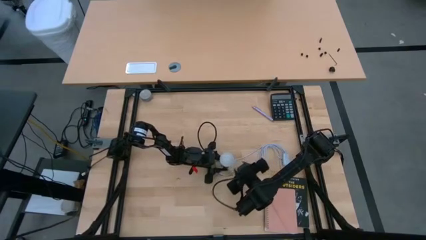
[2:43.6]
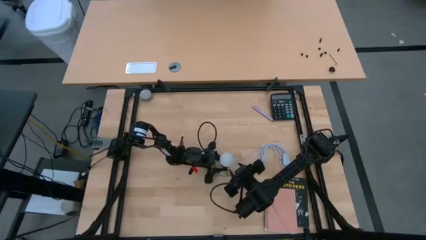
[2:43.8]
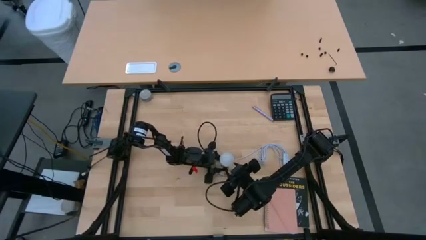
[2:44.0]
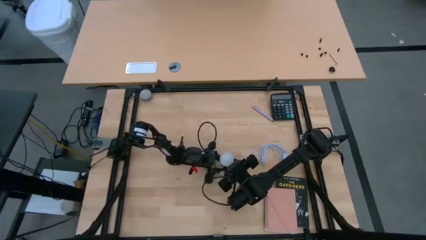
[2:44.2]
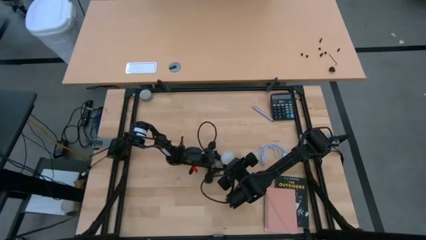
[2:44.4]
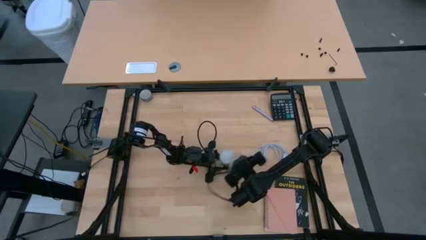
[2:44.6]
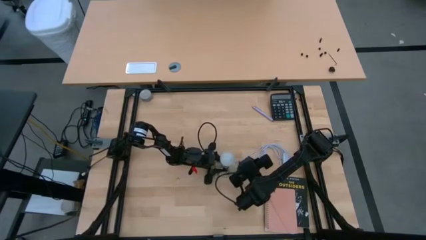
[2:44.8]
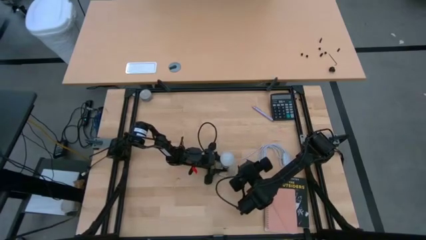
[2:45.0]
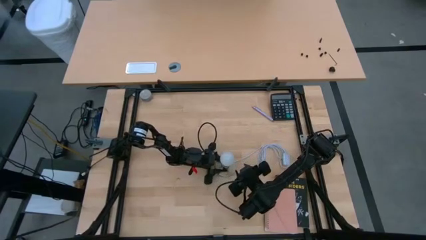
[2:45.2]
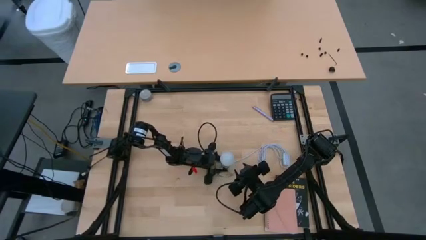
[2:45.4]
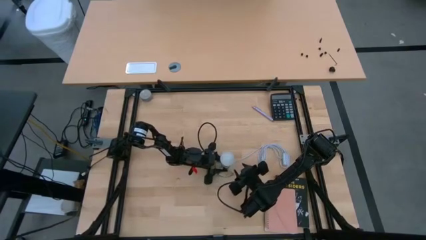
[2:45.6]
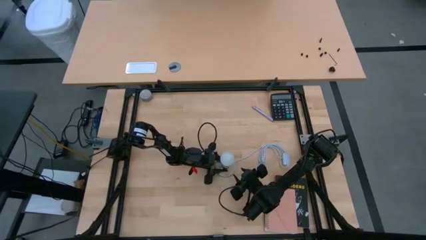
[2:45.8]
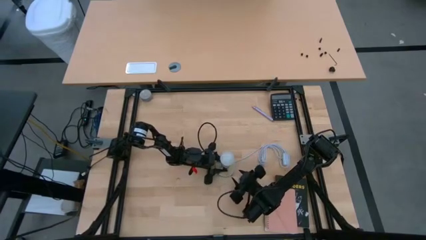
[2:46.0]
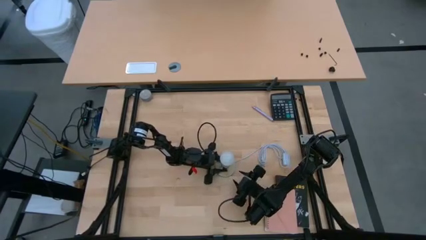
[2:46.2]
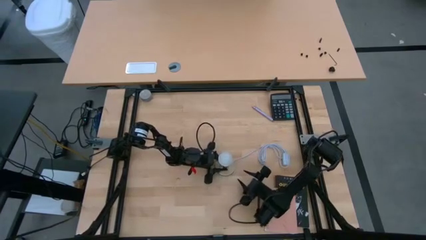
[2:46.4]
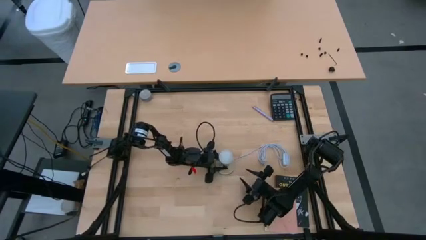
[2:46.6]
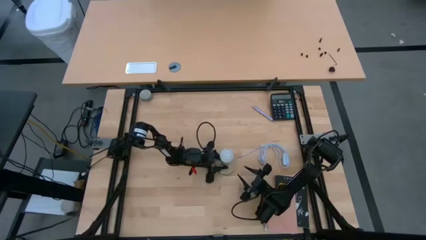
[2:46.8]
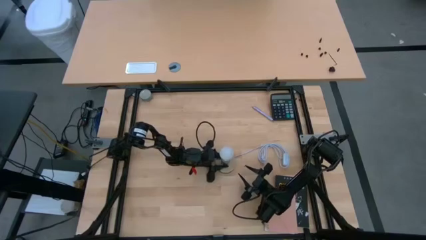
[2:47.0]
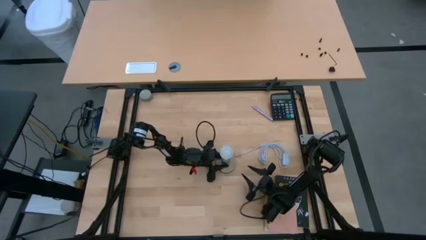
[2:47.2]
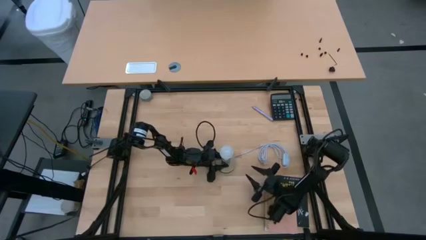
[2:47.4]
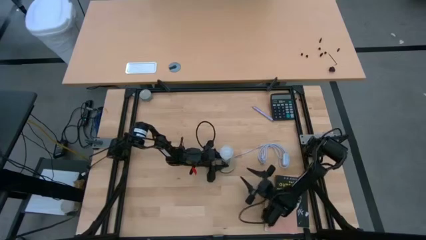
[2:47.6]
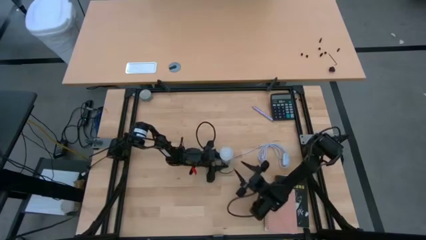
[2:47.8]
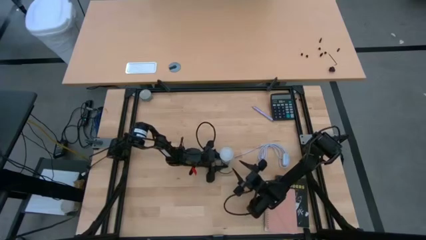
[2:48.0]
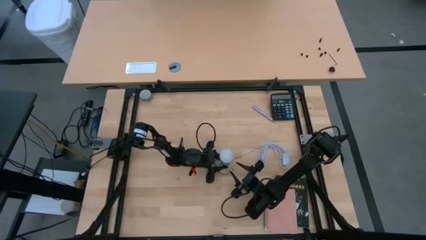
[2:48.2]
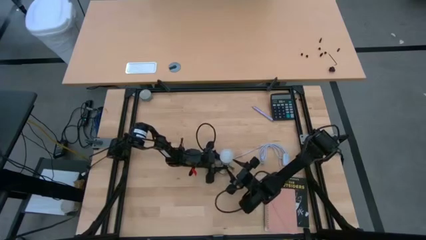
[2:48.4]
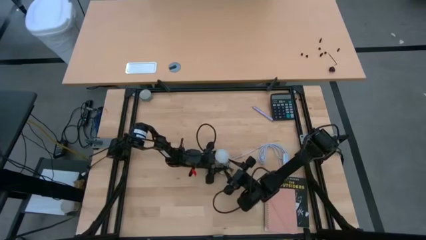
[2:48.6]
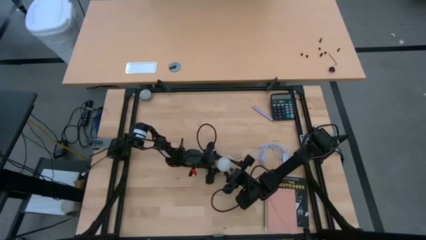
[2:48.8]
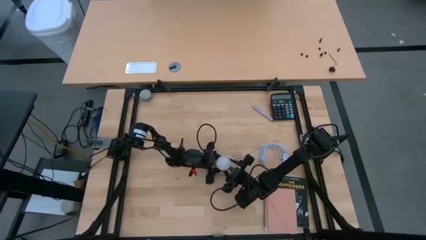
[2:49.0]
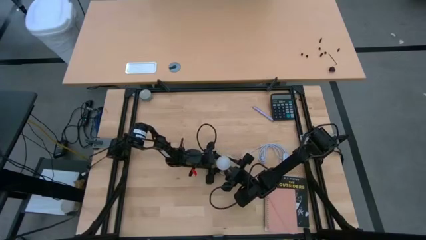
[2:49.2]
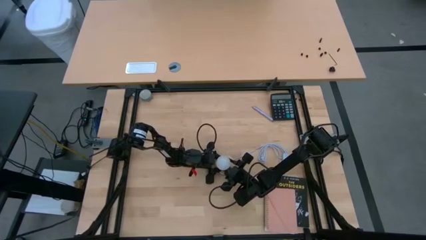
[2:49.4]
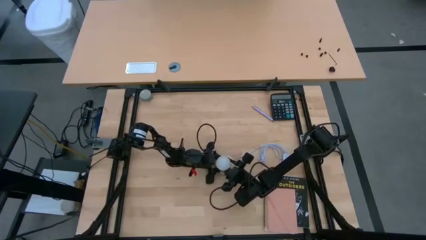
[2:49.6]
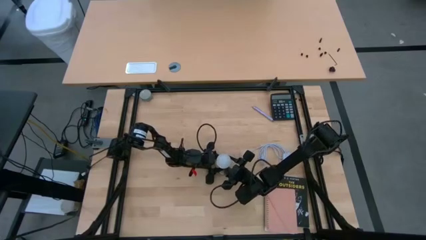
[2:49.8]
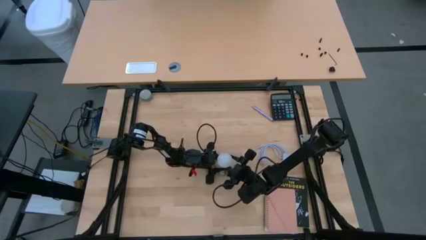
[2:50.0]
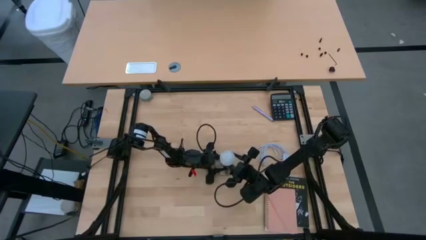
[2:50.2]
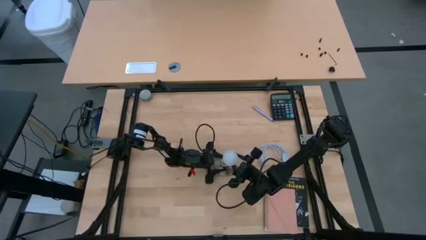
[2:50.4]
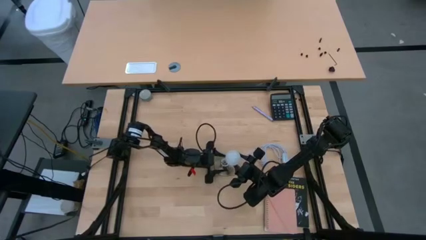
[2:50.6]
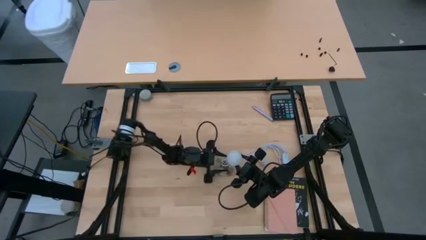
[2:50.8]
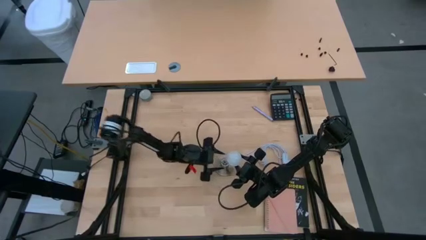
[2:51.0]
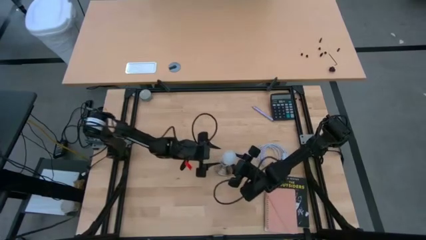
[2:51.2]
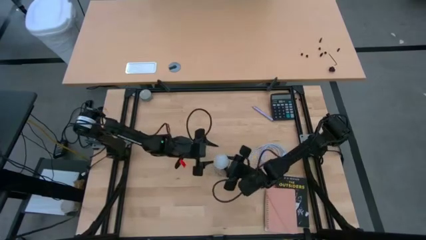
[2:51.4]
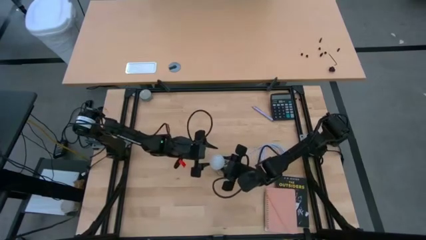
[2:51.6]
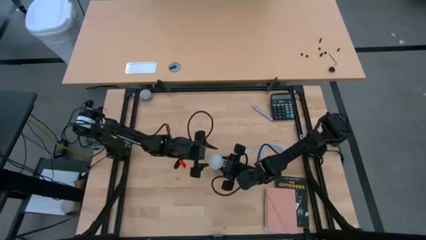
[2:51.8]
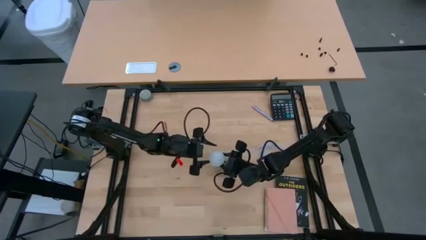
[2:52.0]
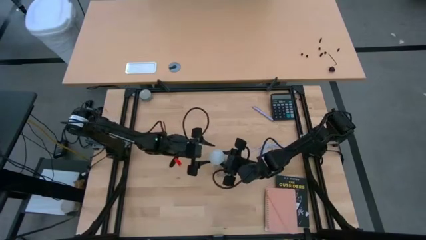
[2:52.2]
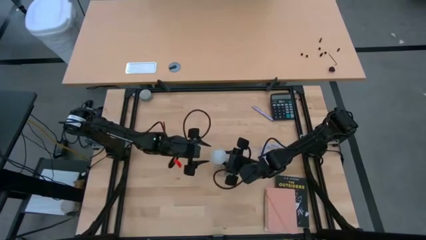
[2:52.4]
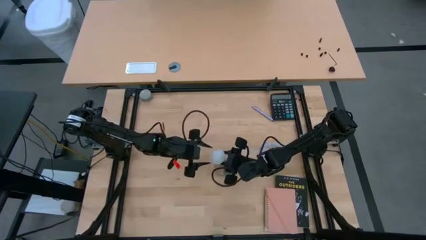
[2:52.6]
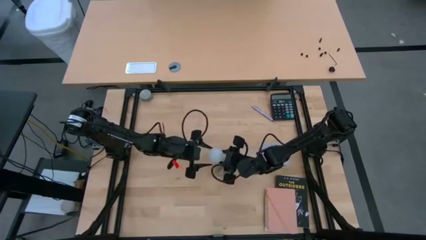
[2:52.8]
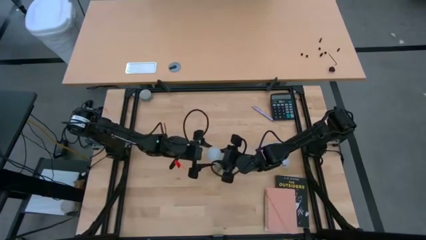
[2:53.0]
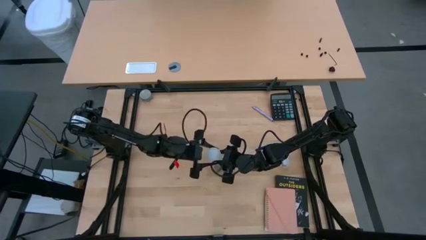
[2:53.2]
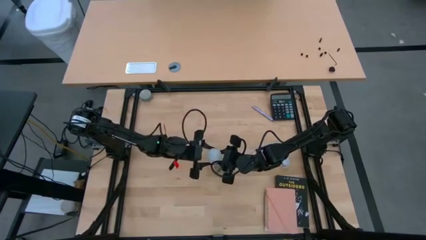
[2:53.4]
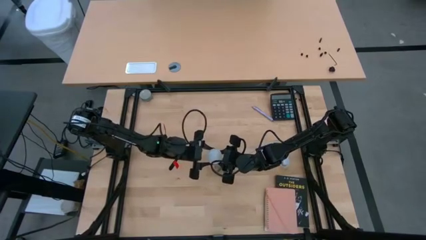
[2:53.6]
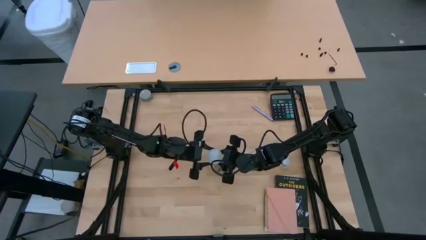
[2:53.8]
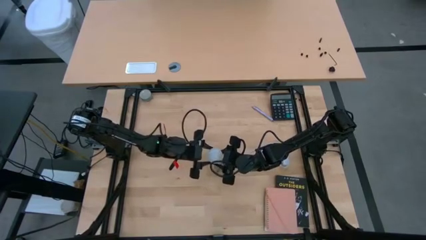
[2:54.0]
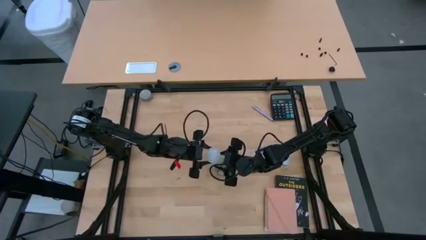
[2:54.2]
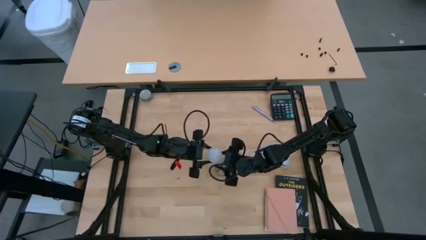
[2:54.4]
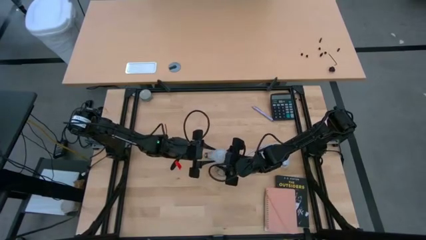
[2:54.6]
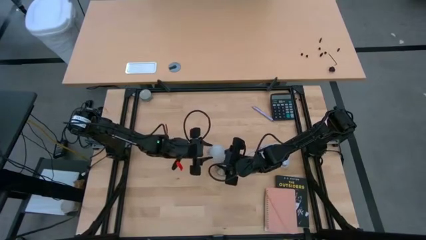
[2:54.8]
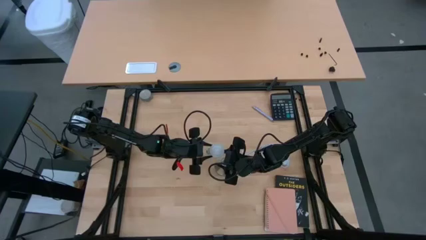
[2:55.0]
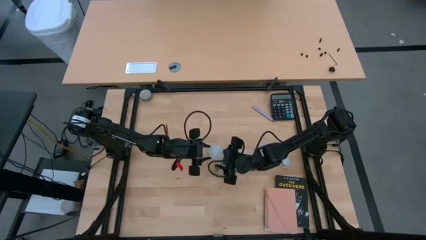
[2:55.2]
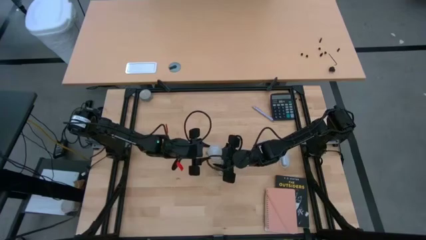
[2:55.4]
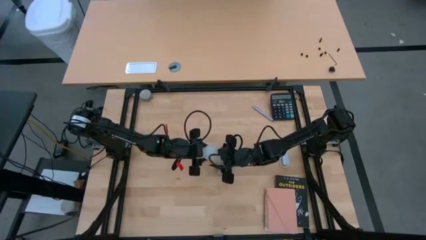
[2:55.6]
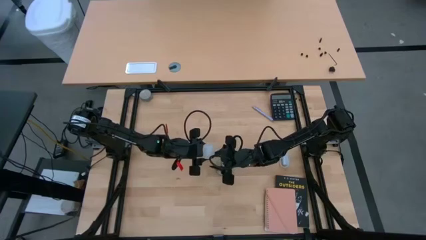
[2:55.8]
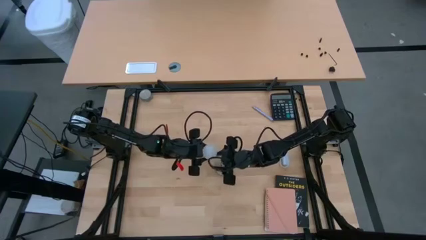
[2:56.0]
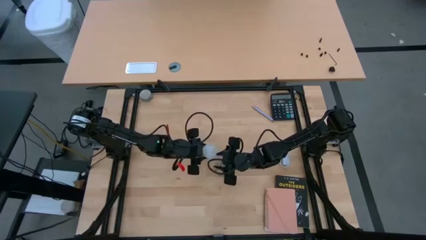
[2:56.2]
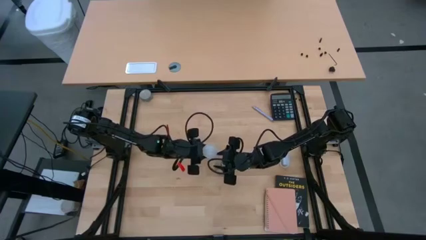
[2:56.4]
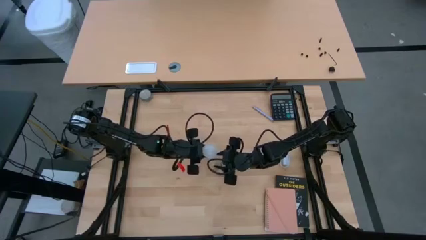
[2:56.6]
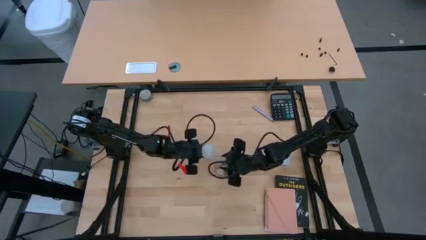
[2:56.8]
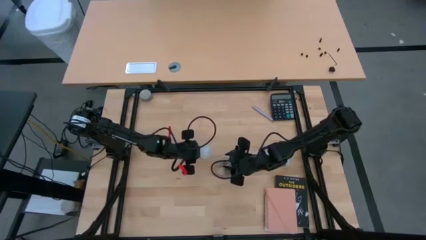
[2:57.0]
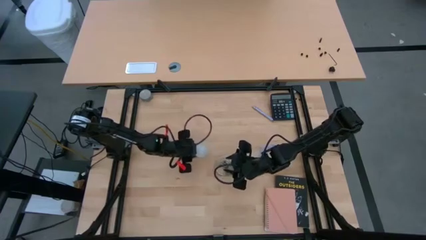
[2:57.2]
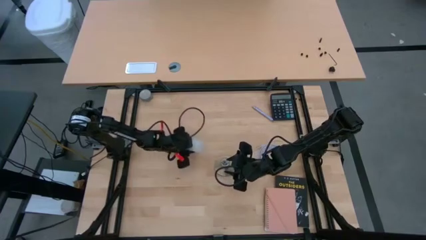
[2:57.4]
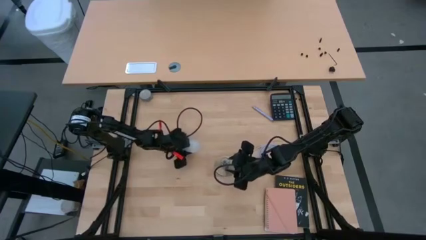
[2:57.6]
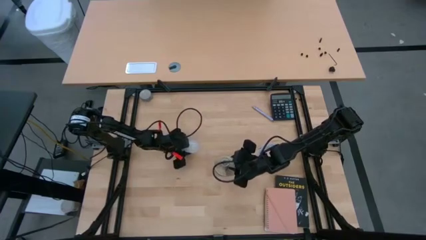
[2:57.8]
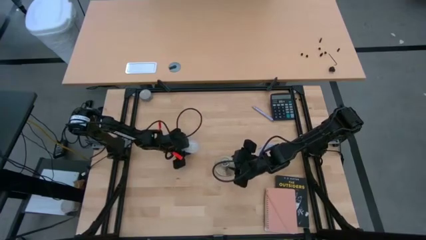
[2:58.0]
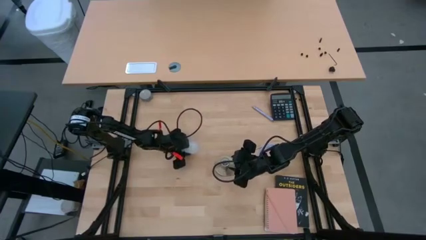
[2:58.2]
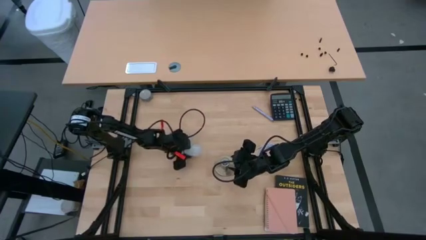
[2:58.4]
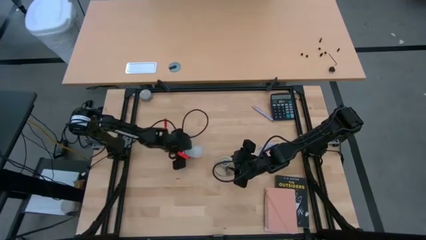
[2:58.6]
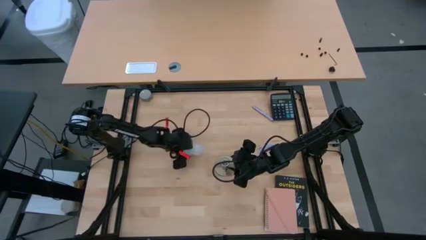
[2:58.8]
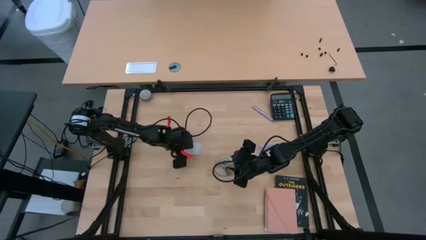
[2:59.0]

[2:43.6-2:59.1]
Task: Screw lightbulb
Remove the light bulb from the lamp
